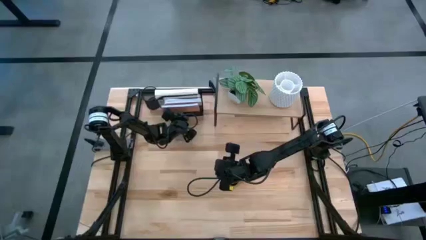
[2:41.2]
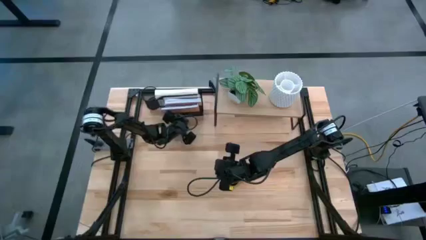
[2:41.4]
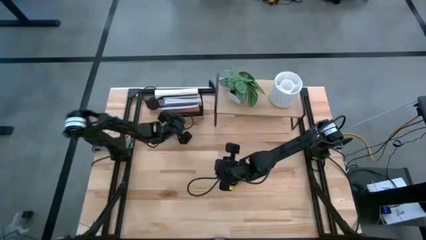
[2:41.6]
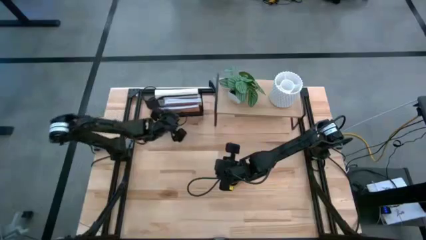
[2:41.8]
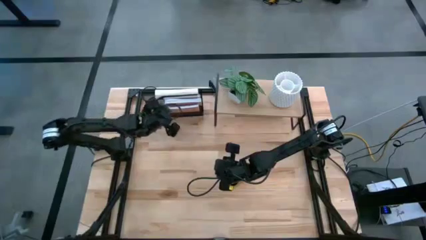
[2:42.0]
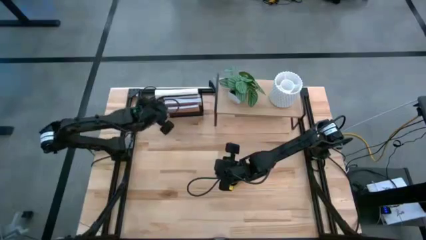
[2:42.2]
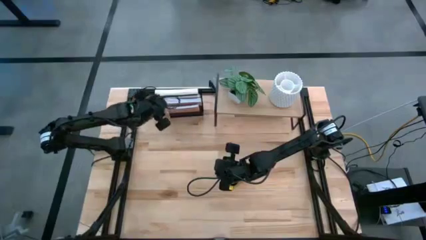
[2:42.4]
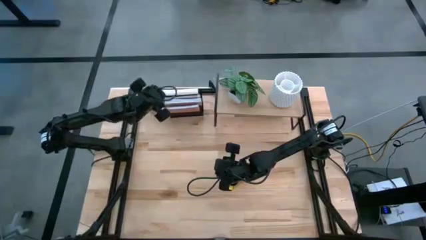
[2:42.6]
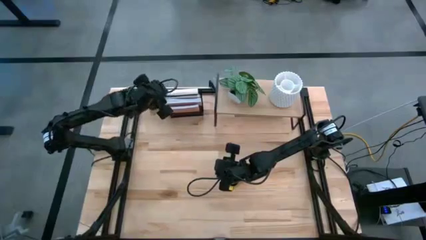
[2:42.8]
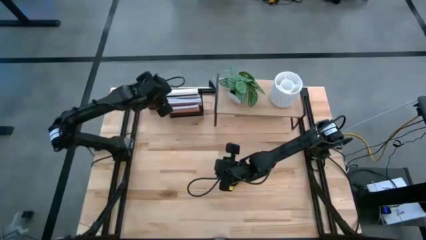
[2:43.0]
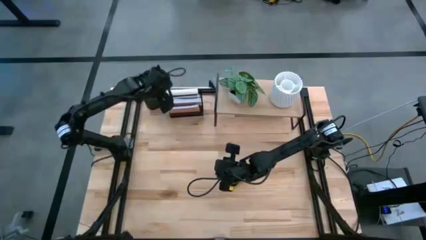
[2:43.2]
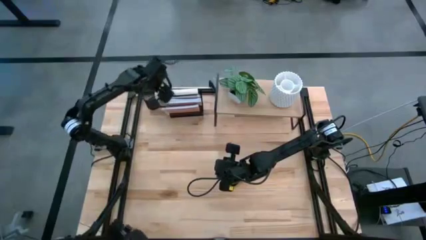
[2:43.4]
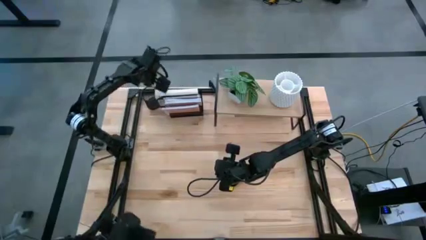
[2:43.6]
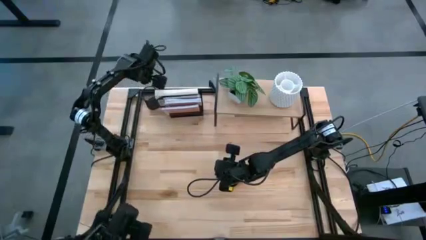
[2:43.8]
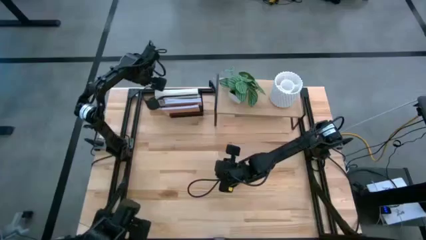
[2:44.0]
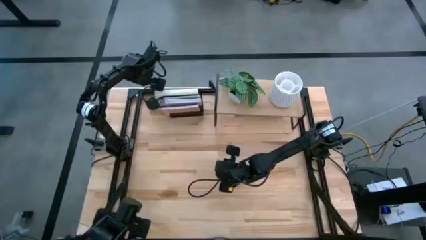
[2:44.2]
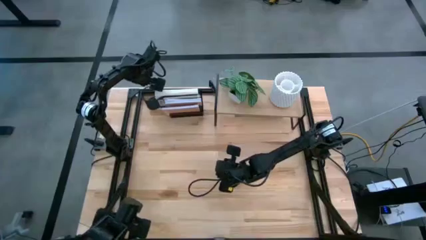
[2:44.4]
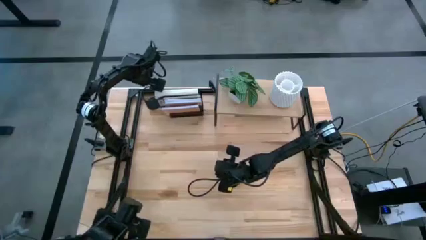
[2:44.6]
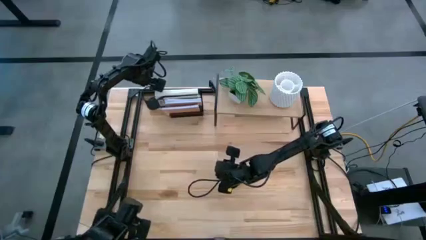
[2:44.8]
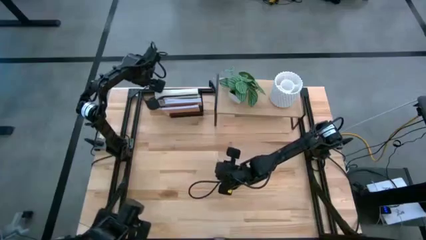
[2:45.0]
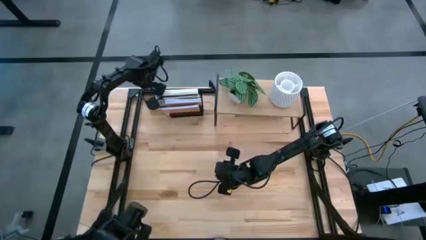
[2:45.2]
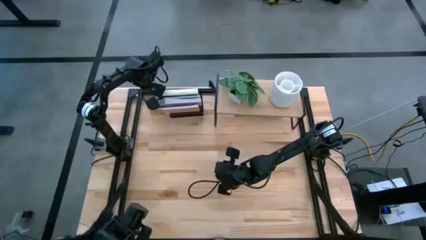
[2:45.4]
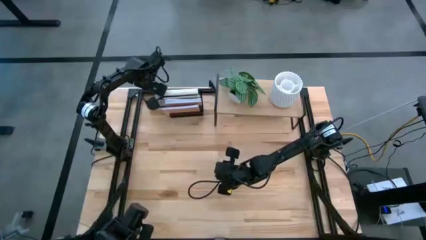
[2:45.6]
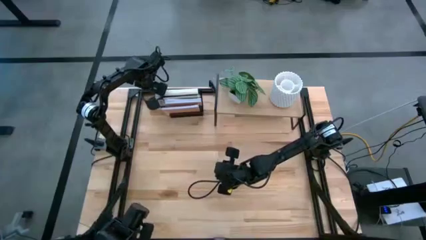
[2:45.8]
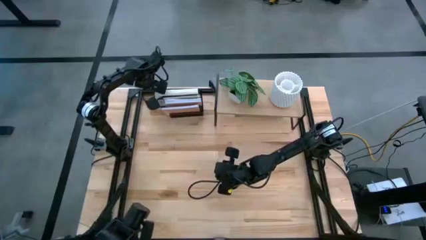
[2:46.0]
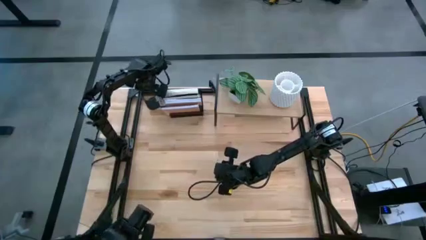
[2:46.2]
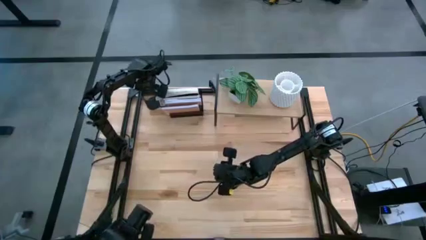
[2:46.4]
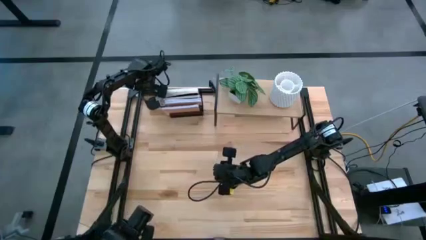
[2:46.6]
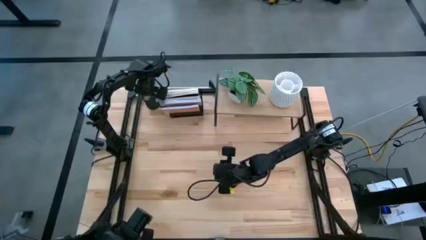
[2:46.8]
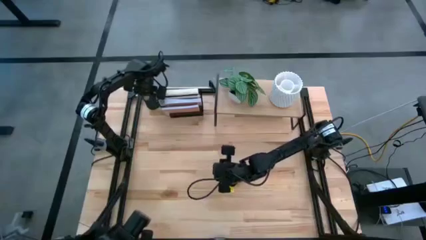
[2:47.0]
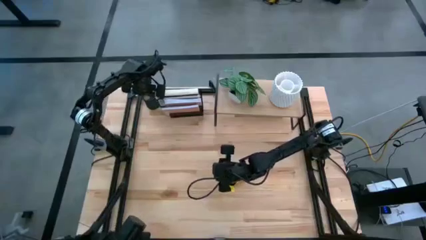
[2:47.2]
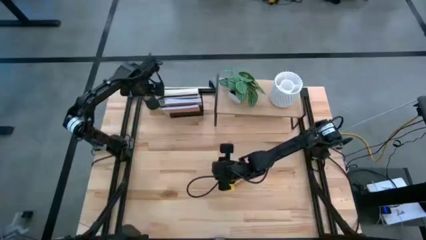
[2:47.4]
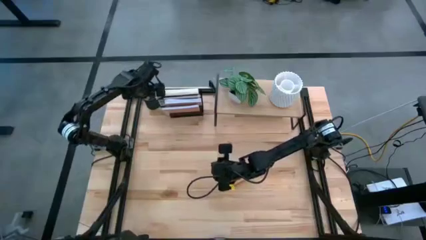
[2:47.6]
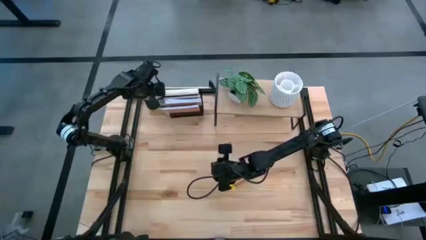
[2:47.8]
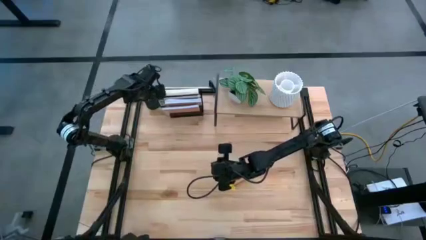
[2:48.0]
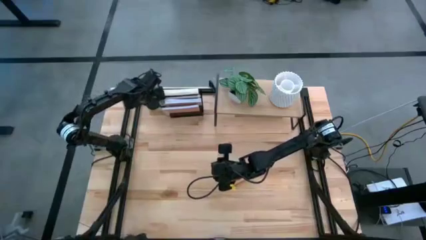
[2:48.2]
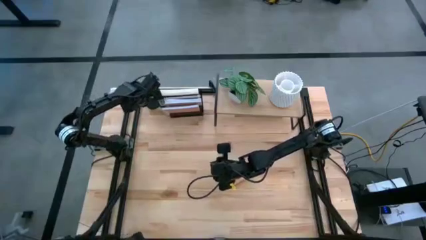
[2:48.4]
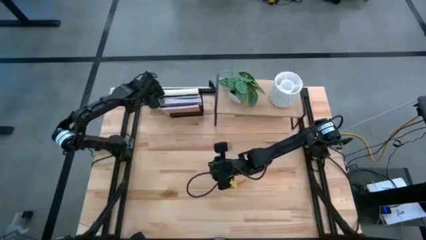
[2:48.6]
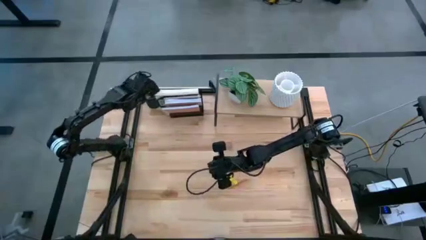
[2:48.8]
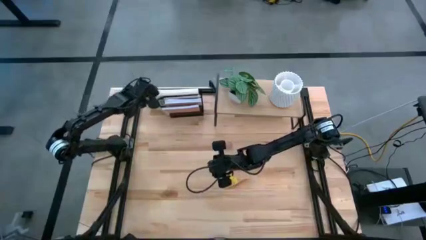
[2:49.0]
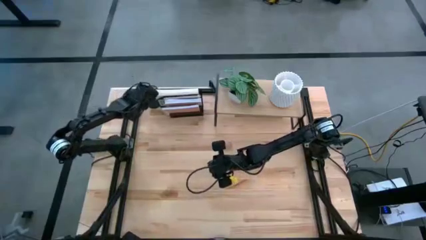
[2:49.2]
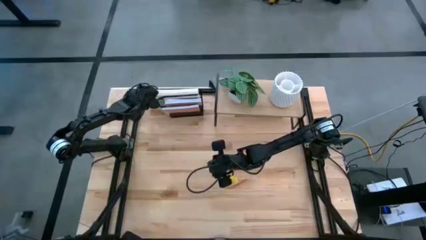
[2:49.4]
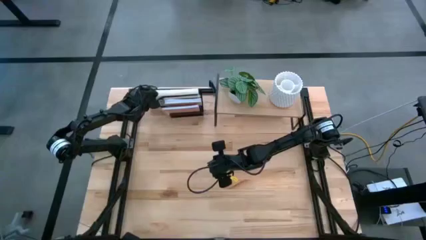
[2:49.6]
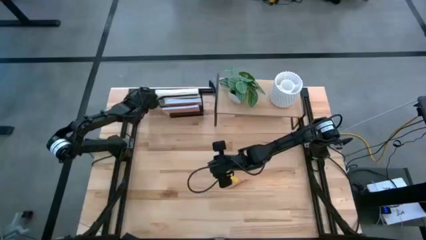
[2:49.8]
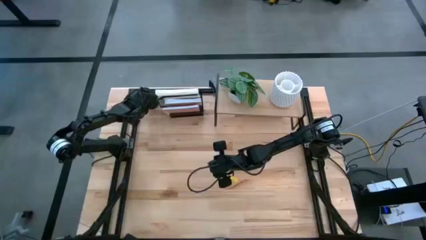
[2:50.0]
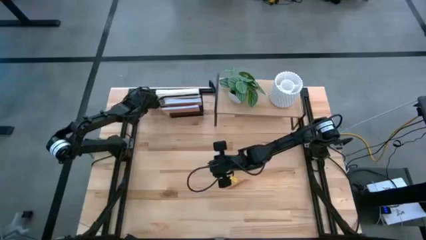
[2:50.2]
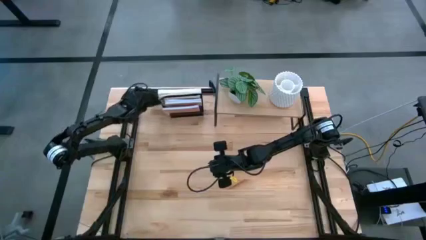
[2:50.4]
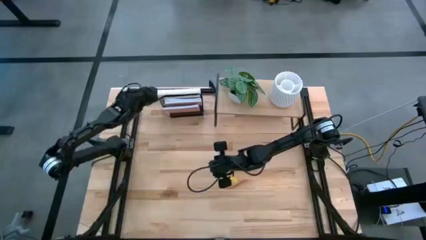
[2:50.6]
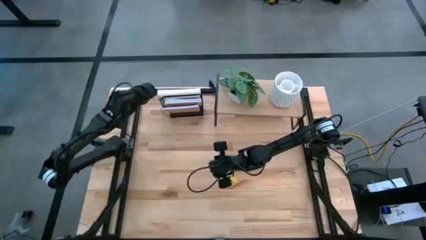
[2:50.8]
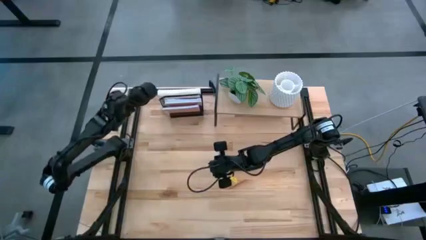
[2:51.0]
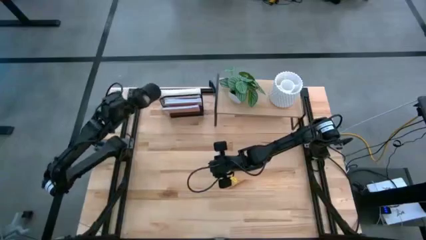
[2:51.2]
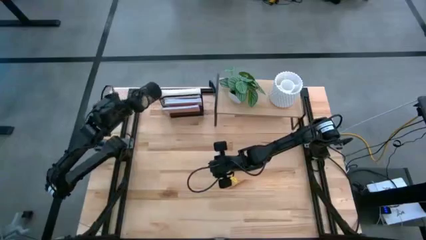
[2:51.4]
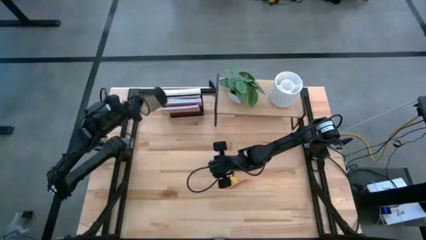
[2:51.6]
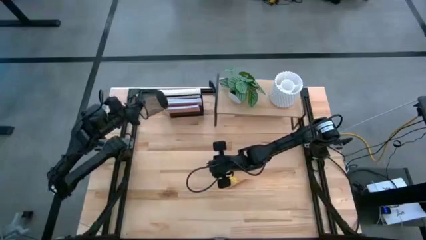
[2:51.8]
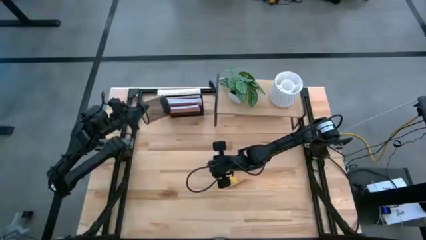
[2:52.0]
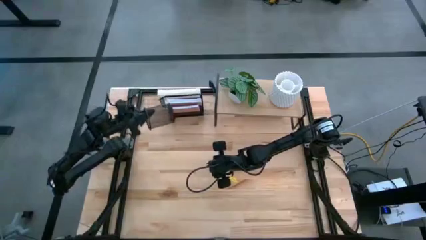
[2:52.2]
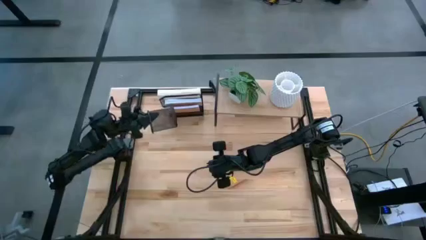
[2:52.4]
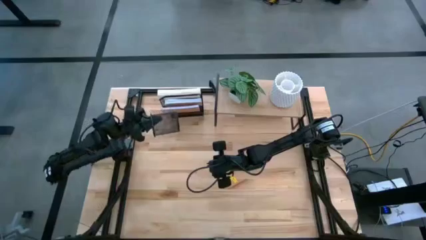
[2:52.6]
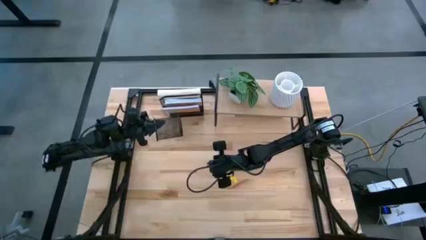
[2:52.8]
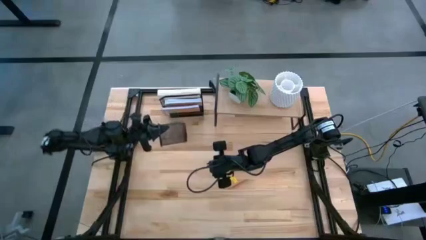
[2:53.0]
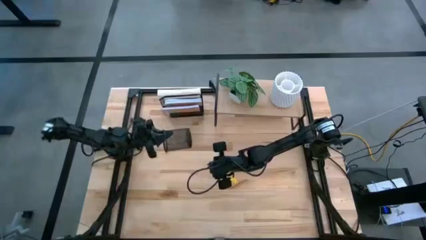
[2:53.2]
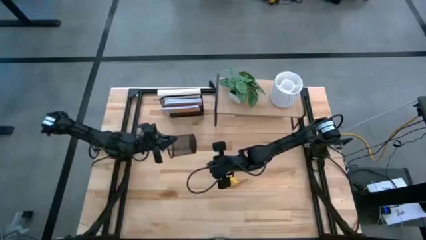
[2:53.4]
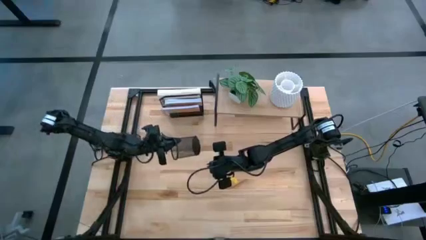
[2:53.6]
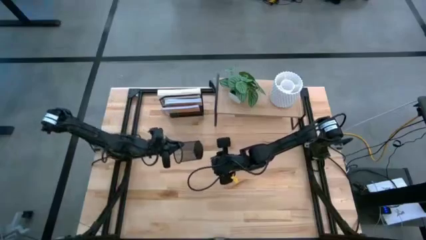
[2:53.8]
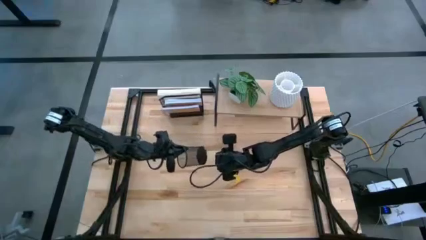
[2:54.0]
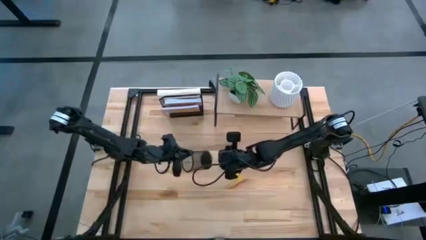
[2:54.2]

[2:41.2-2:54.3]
Task: Stock shelves
Put the black pen organizer under the shelf
